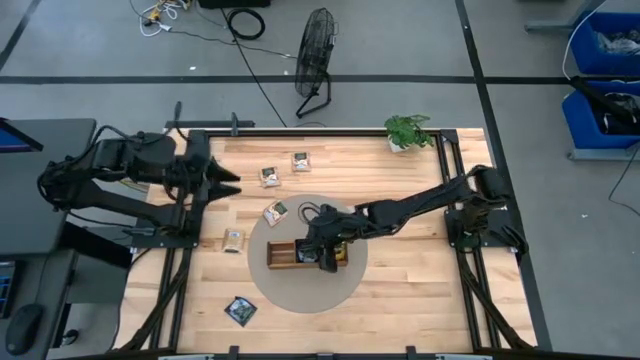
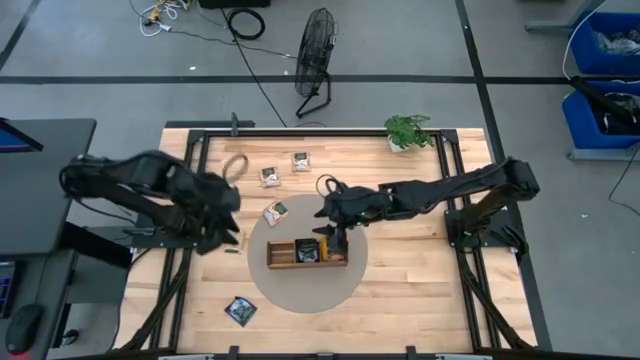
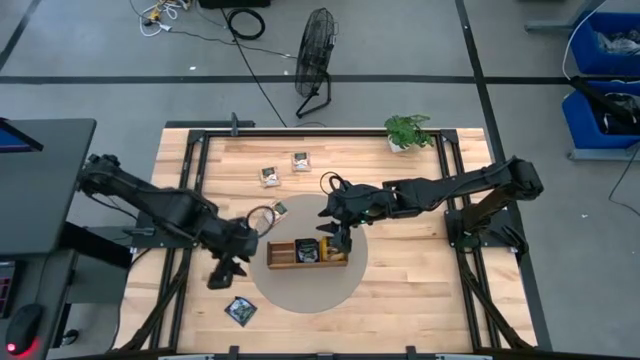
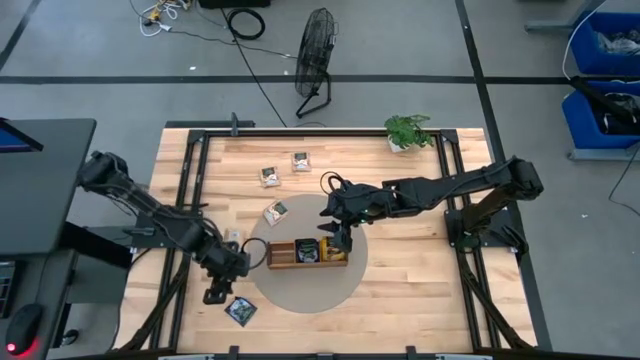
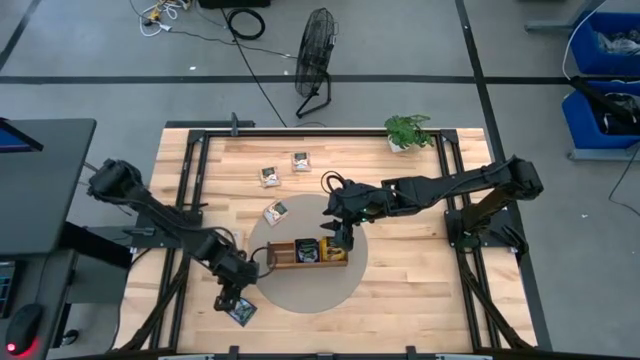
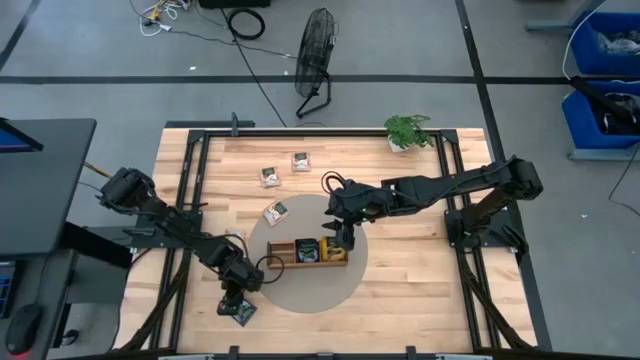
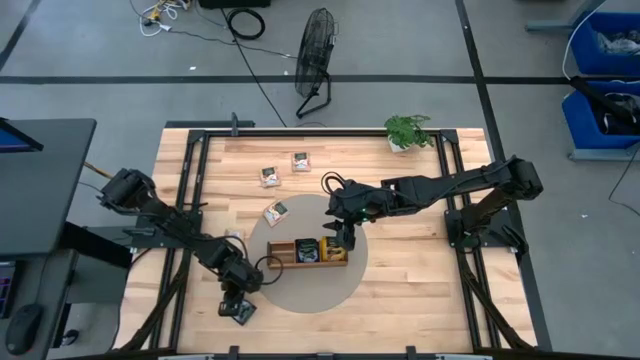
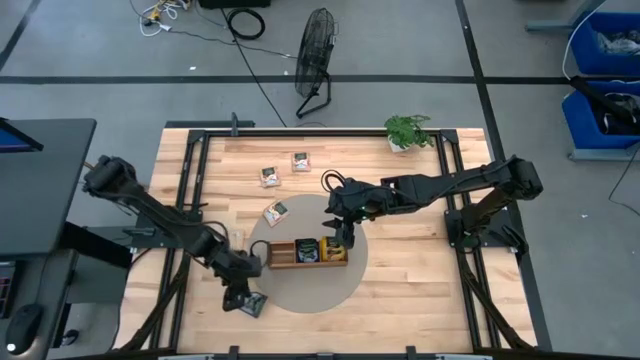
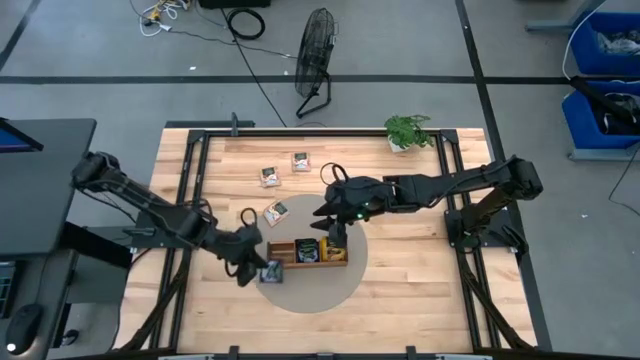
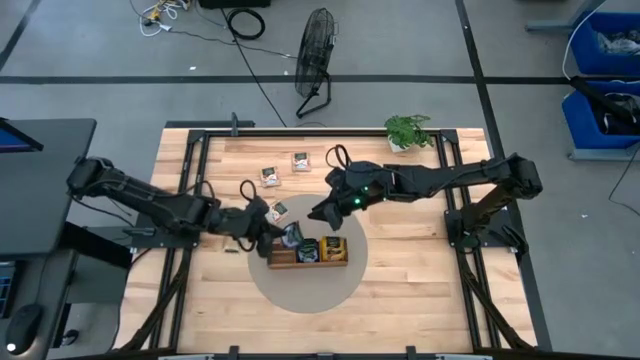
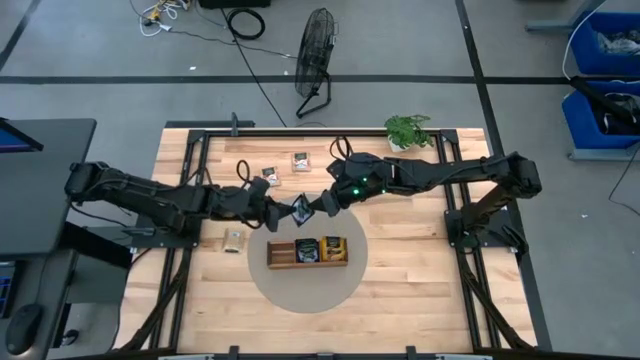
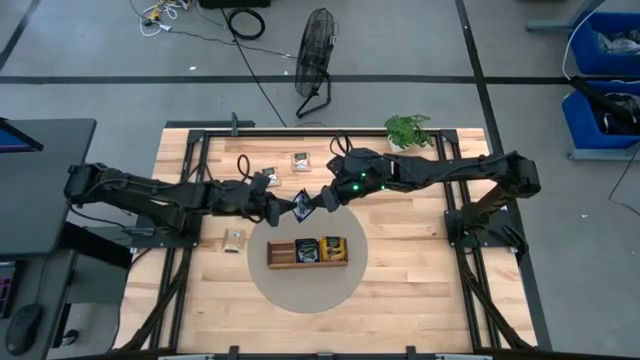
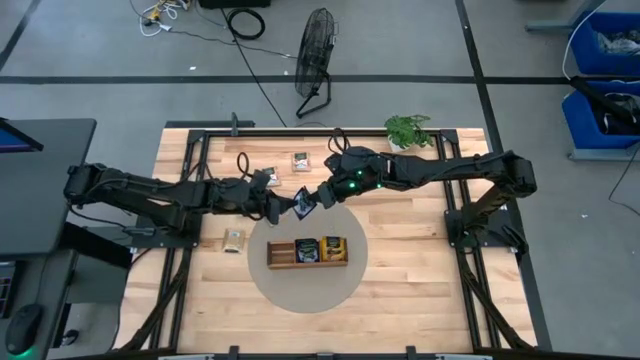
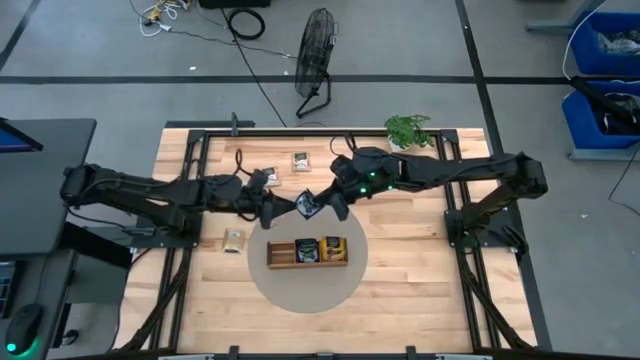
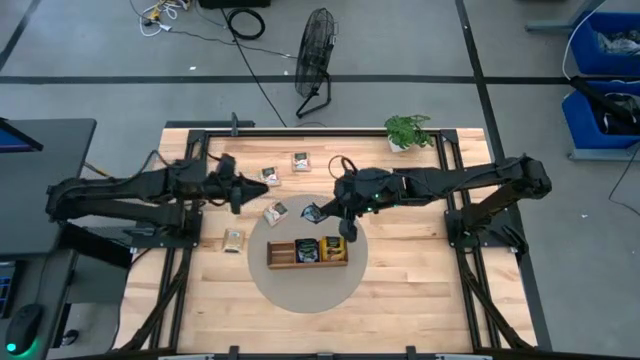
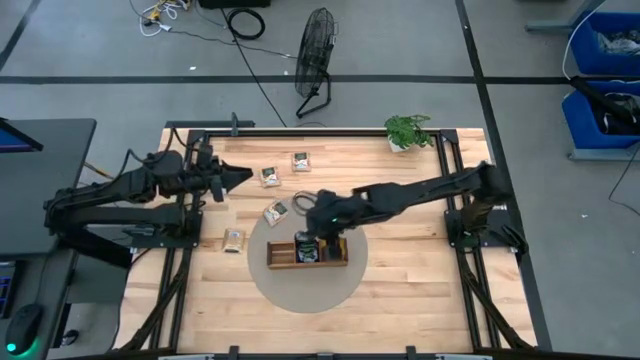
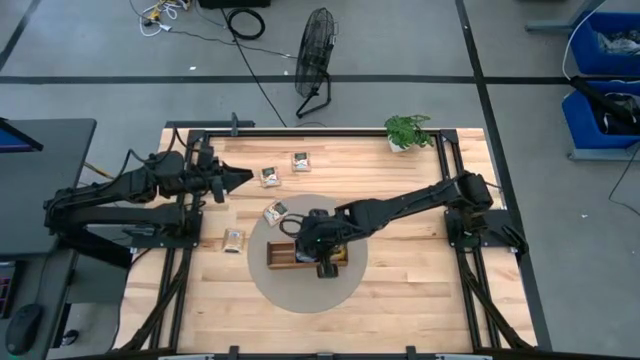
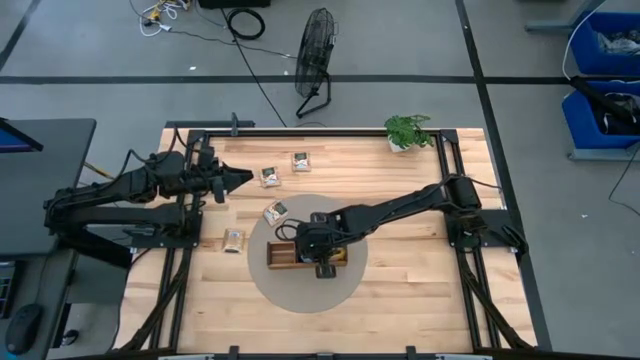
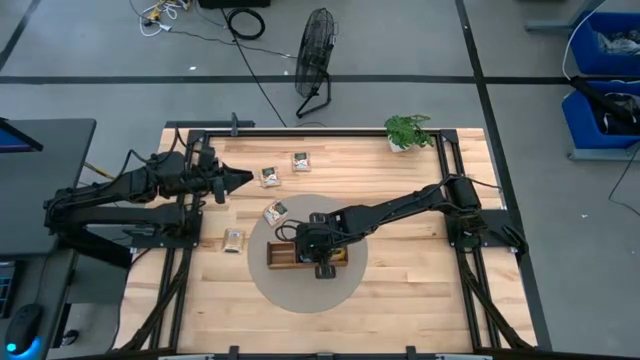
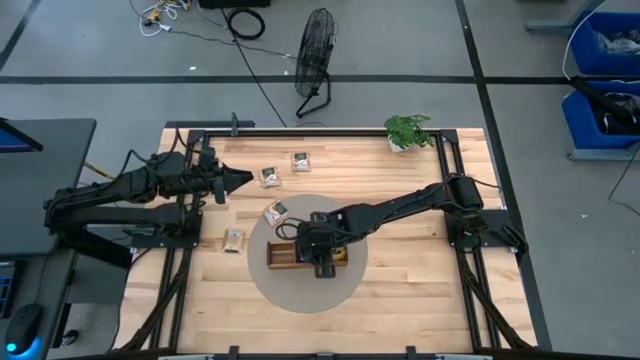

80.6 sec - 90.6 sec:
Task: Pick & Place Tea
Put the violet tea bag into the middle section of the wooden organizer

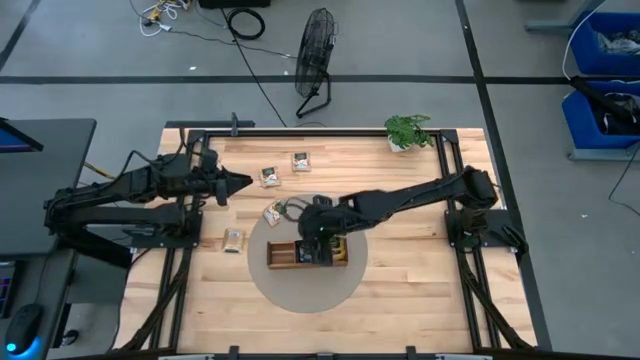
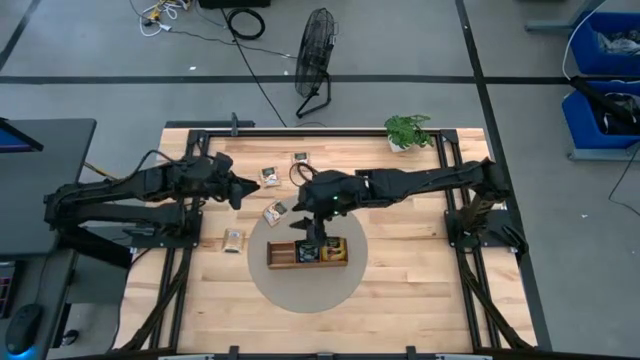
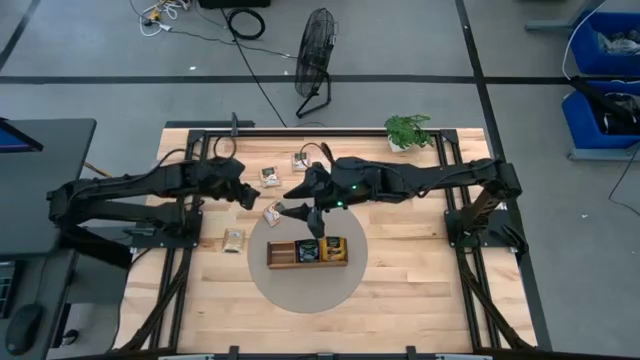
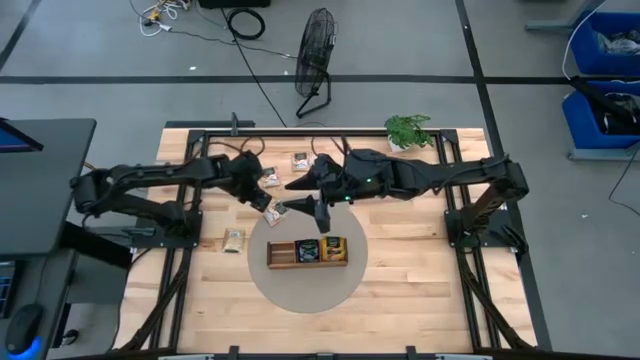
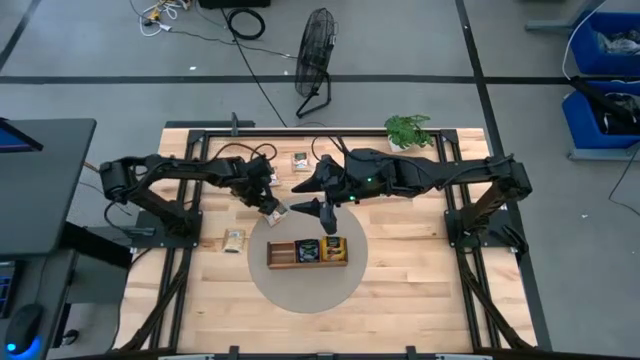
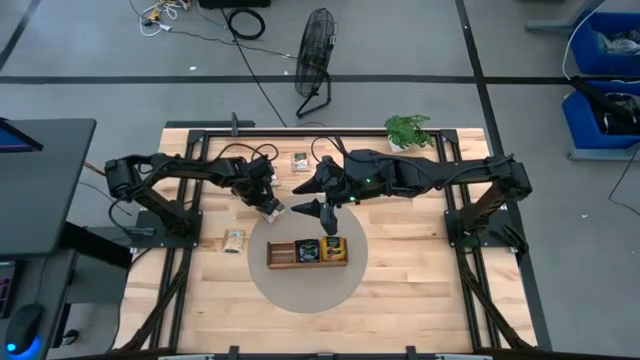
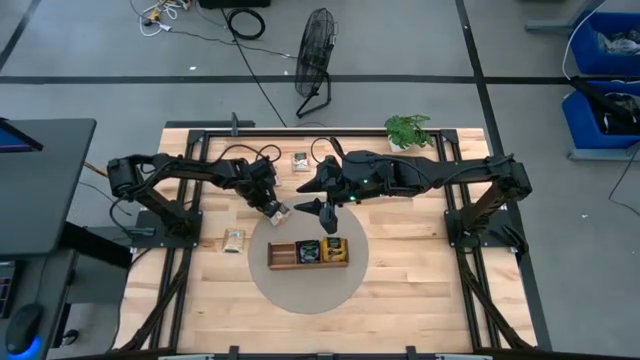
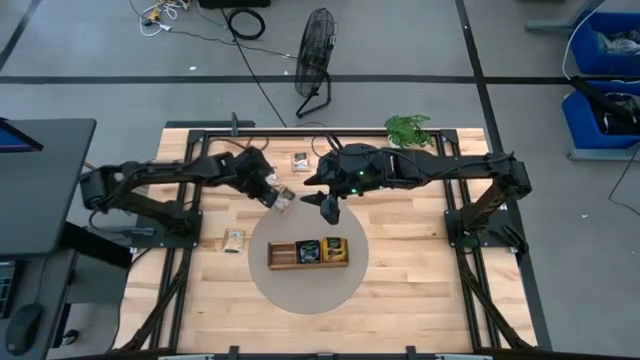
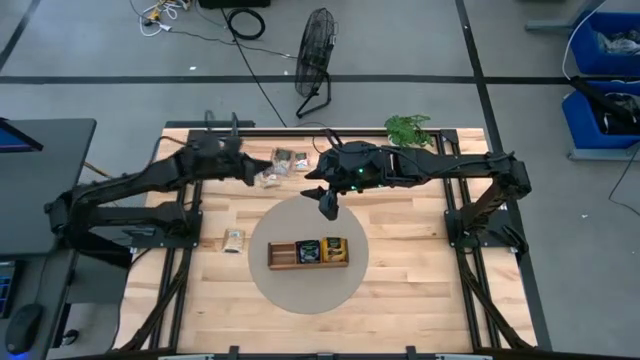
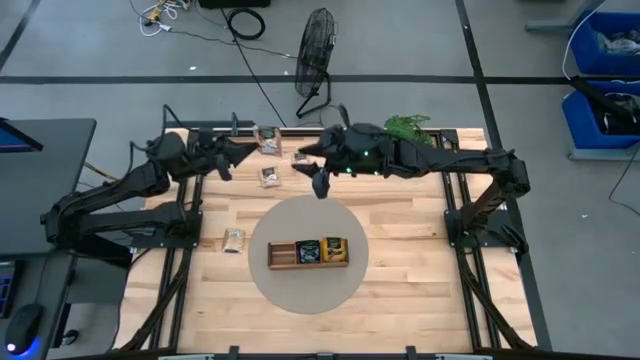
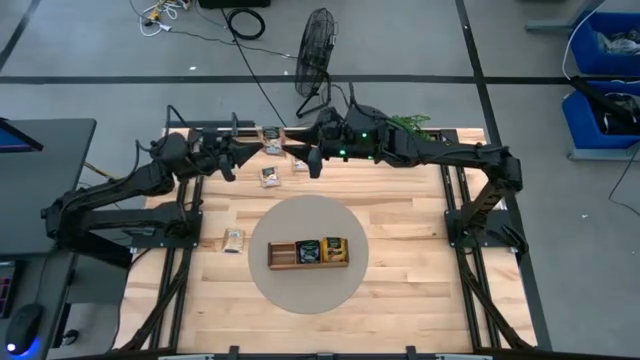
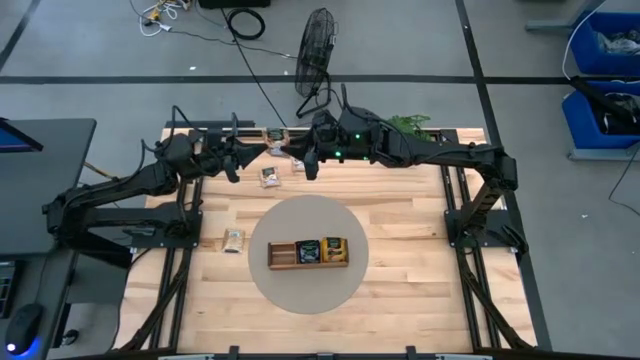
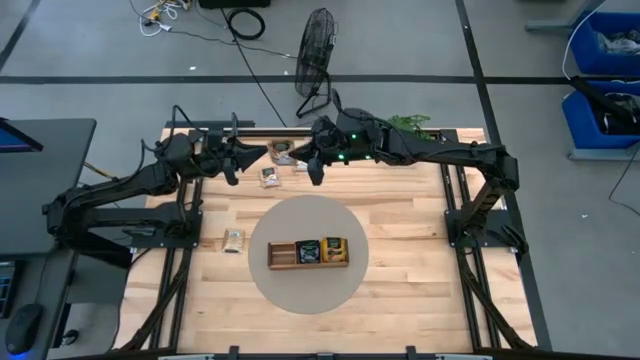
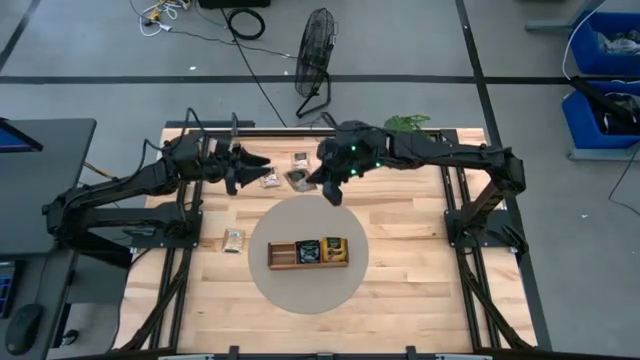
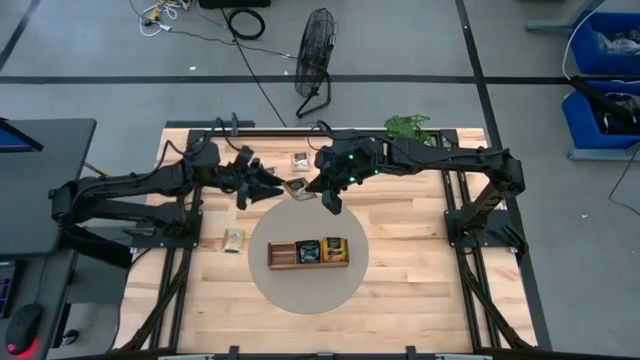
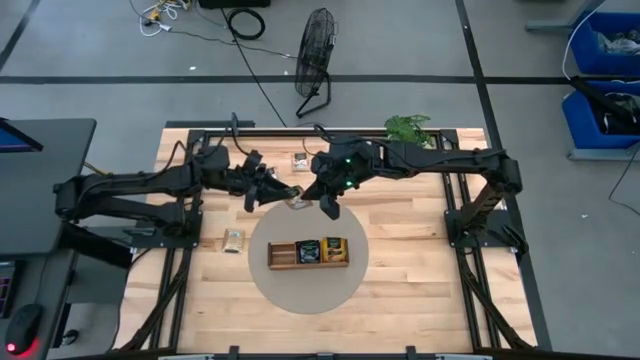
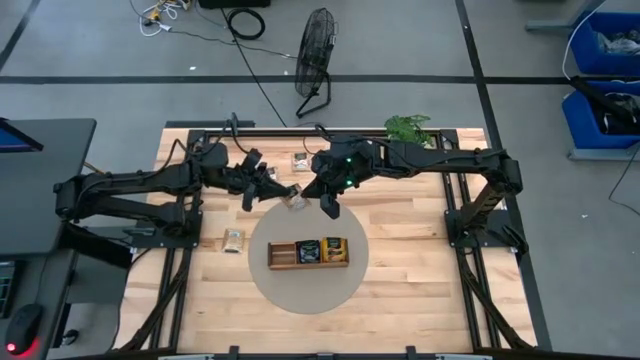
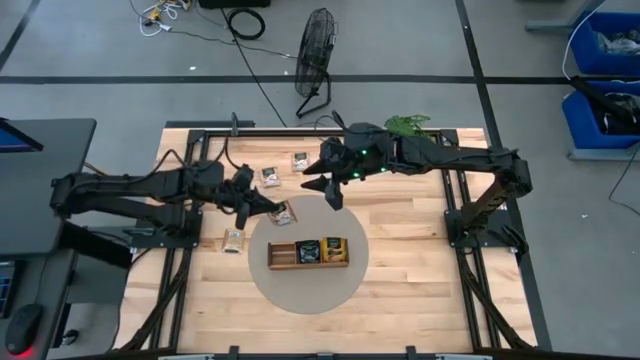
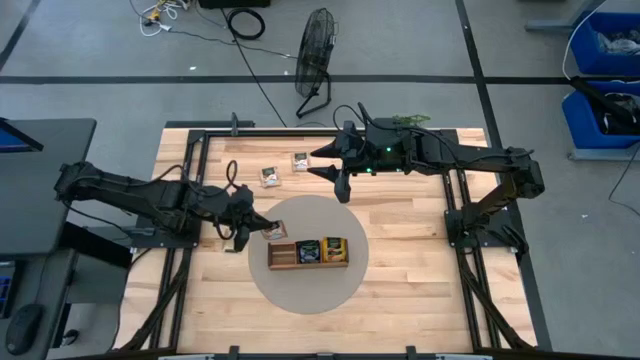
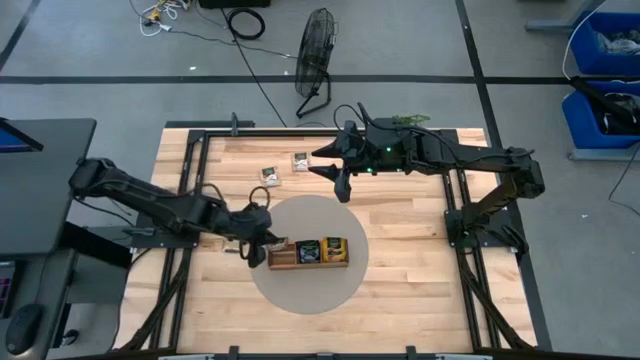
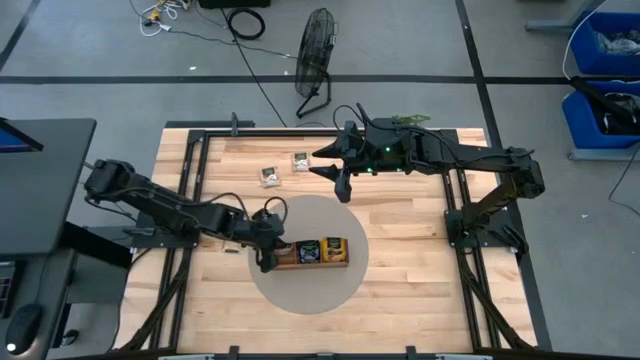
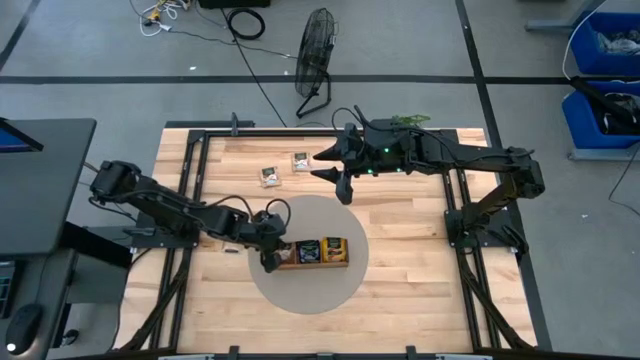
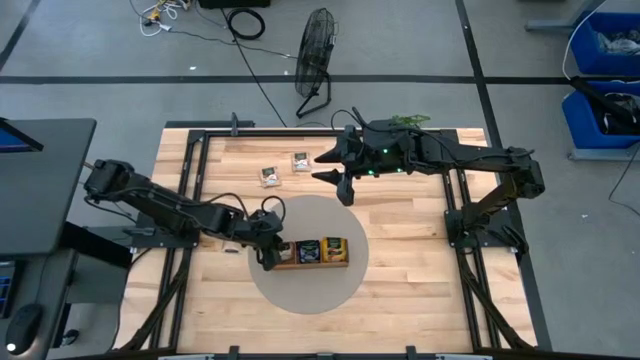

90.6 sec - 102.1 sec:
Put the brown tea bag into the left section of the wooden organizer
